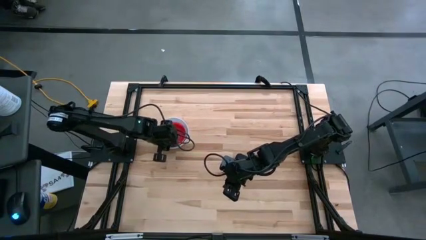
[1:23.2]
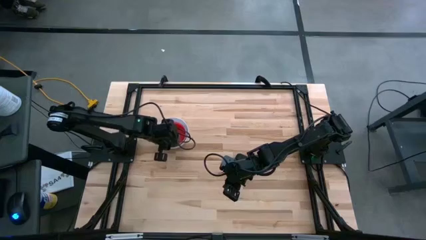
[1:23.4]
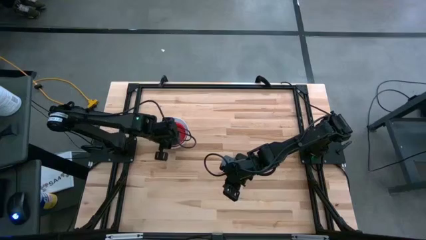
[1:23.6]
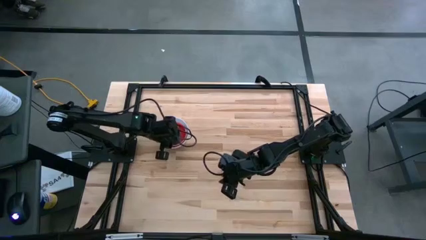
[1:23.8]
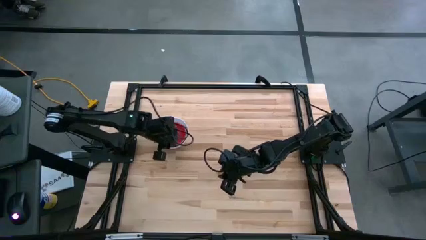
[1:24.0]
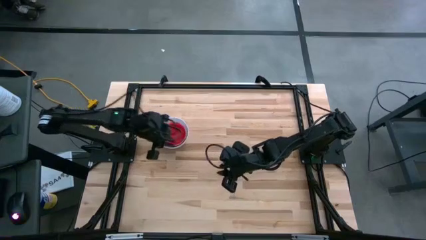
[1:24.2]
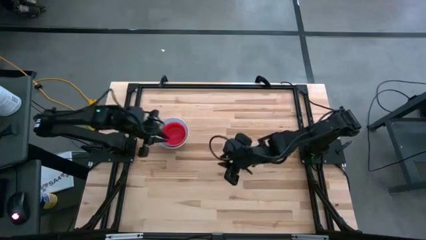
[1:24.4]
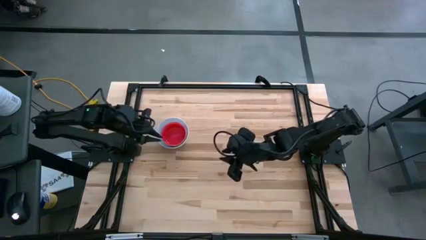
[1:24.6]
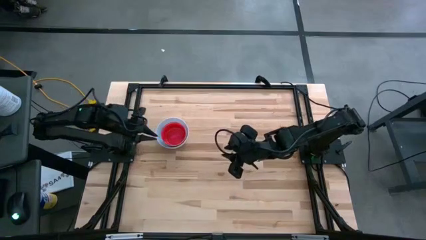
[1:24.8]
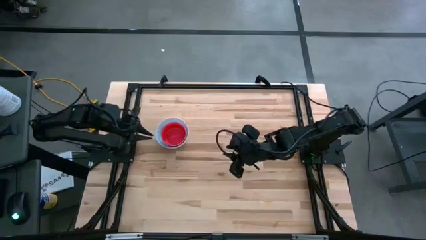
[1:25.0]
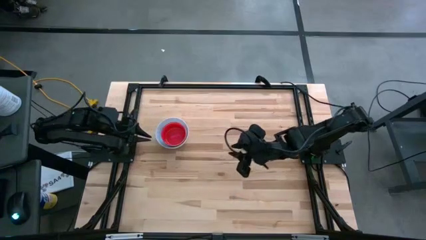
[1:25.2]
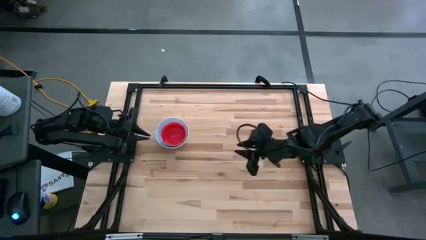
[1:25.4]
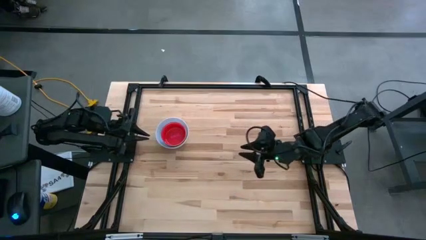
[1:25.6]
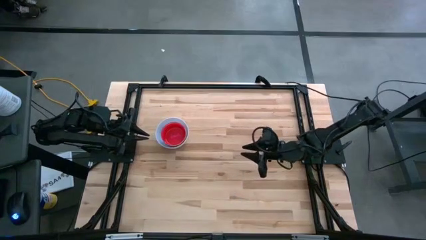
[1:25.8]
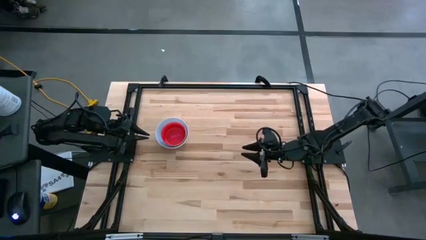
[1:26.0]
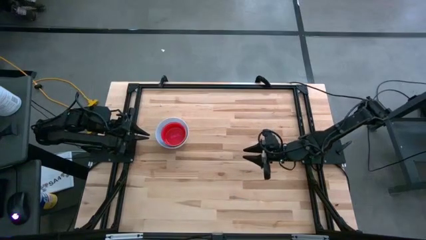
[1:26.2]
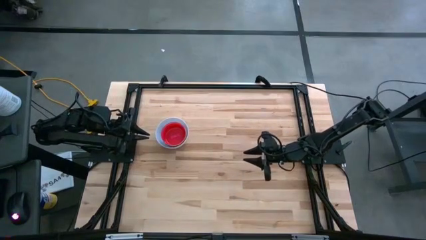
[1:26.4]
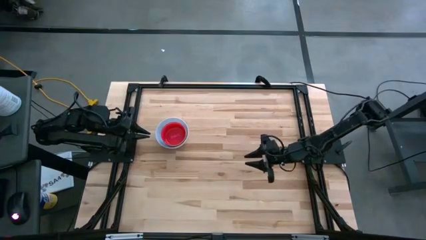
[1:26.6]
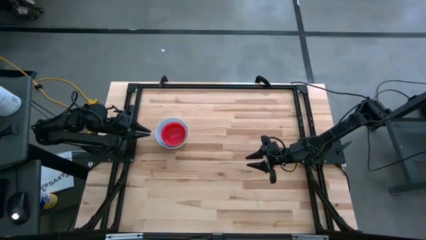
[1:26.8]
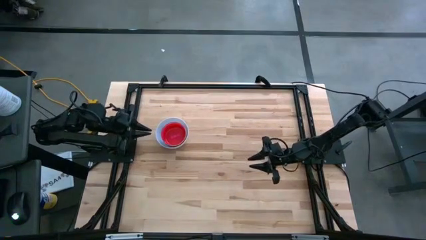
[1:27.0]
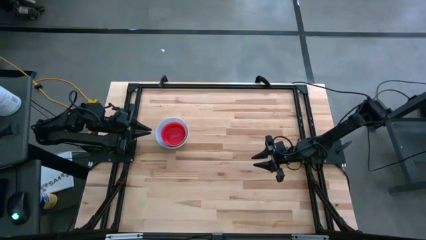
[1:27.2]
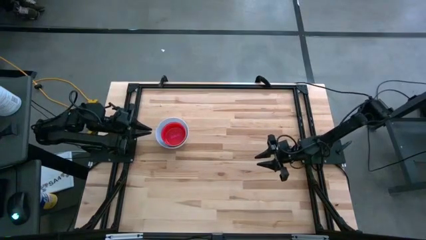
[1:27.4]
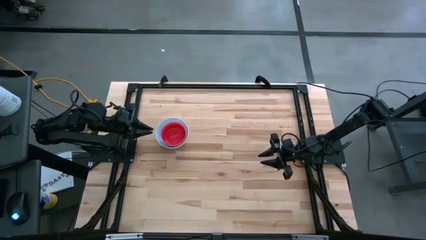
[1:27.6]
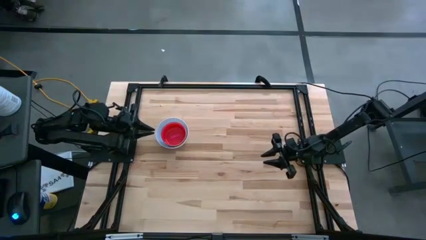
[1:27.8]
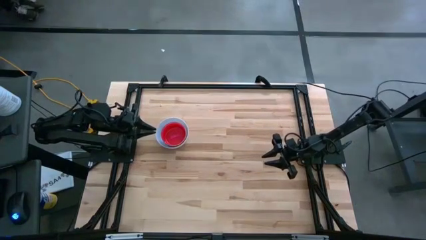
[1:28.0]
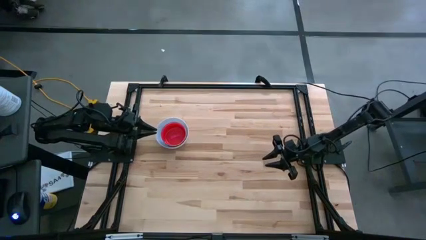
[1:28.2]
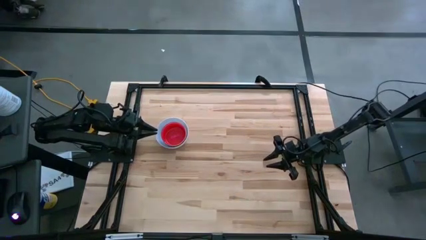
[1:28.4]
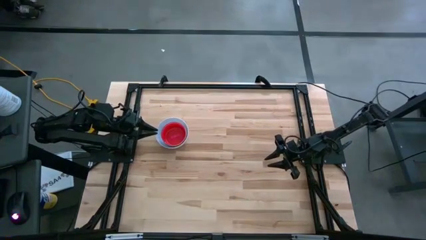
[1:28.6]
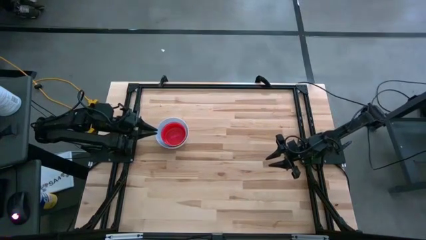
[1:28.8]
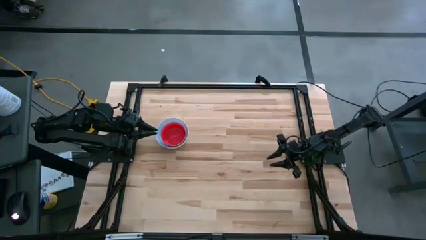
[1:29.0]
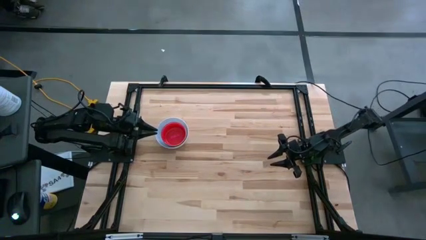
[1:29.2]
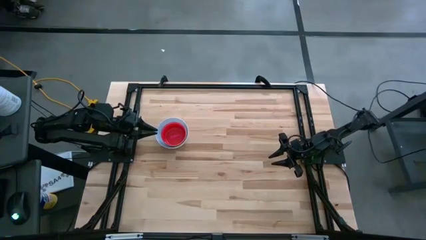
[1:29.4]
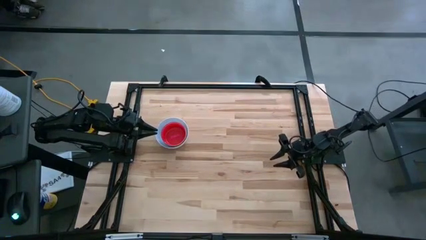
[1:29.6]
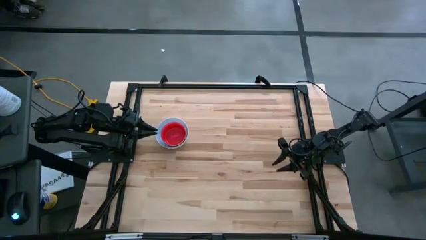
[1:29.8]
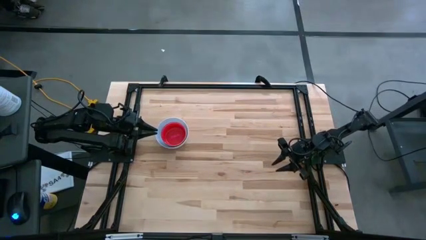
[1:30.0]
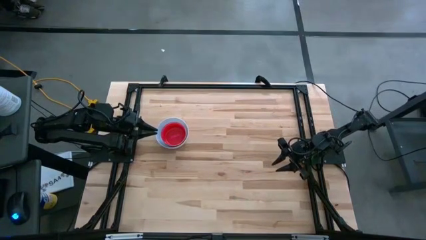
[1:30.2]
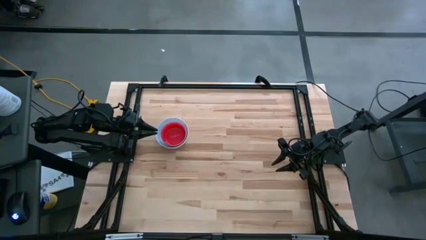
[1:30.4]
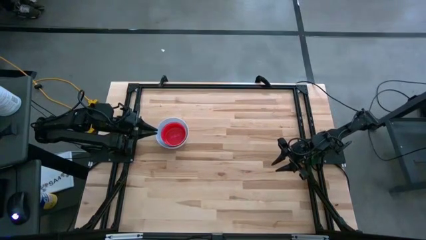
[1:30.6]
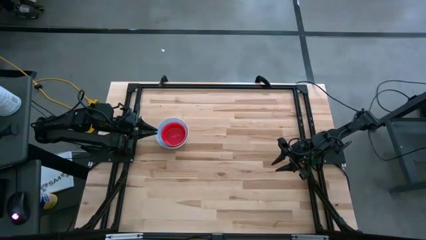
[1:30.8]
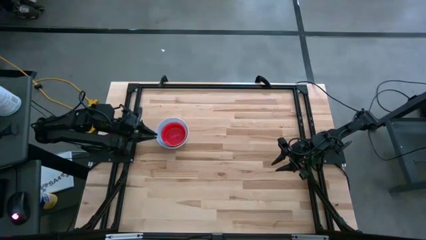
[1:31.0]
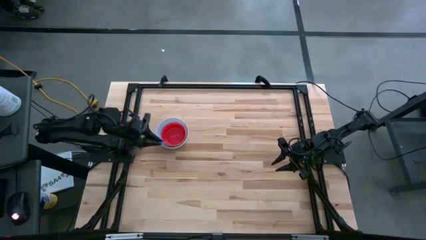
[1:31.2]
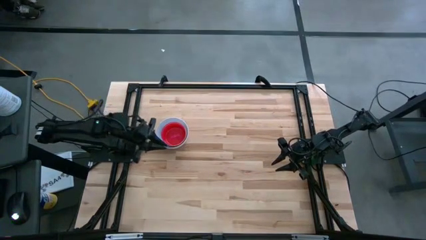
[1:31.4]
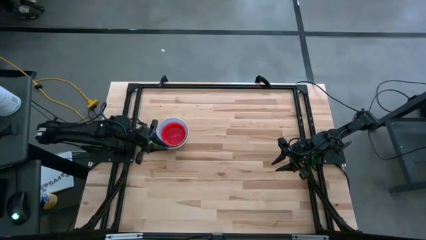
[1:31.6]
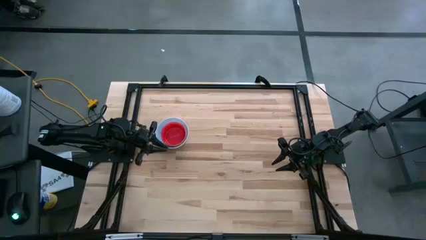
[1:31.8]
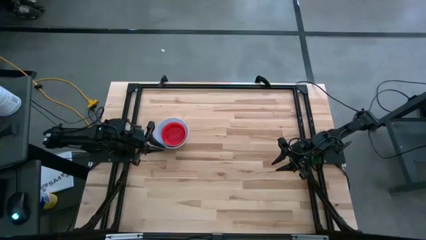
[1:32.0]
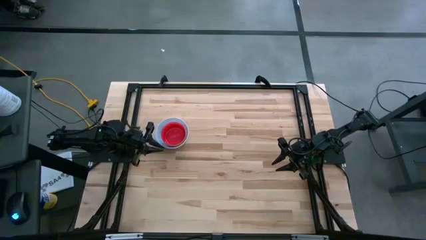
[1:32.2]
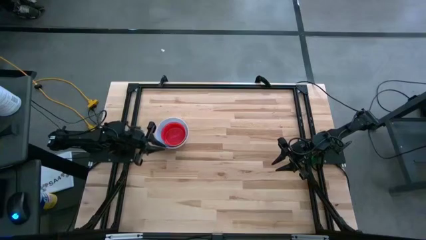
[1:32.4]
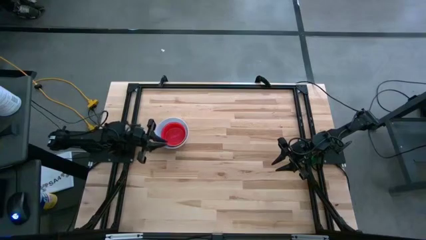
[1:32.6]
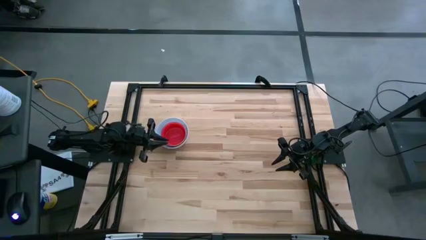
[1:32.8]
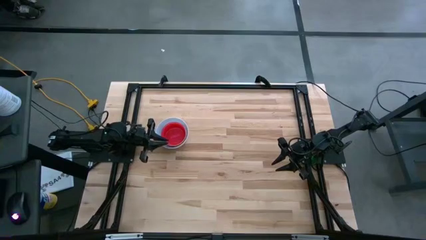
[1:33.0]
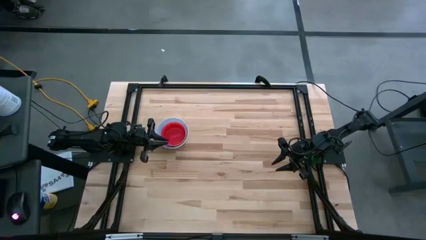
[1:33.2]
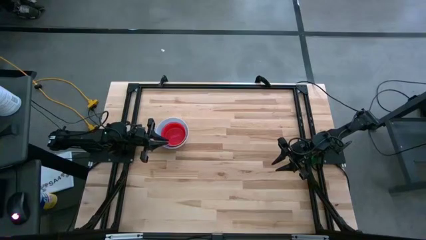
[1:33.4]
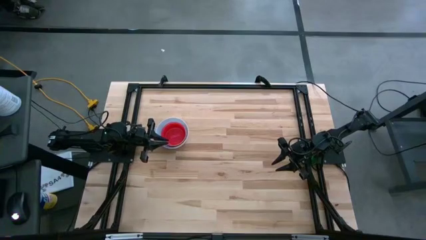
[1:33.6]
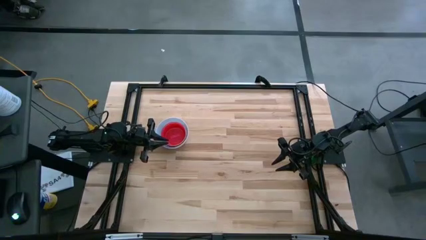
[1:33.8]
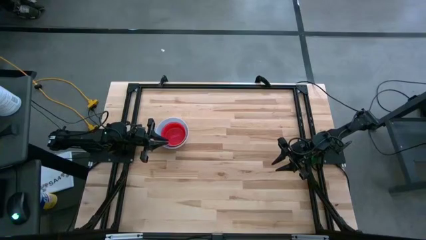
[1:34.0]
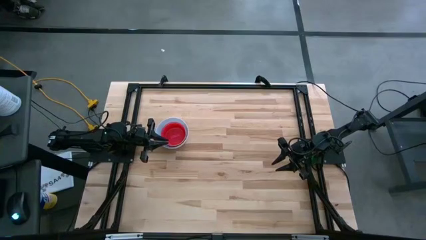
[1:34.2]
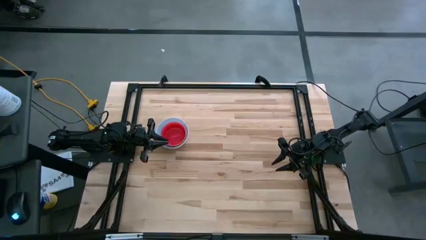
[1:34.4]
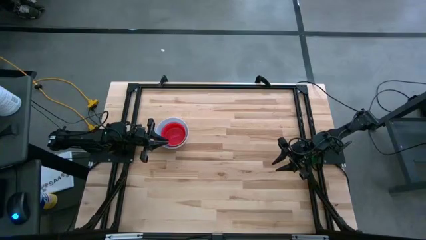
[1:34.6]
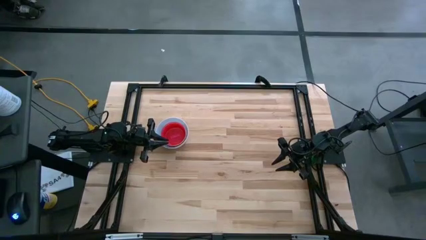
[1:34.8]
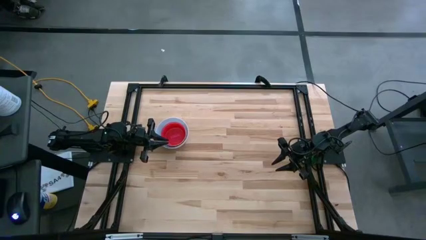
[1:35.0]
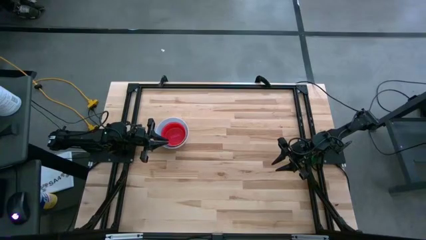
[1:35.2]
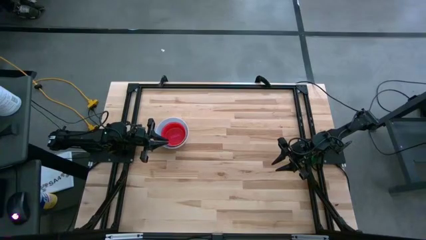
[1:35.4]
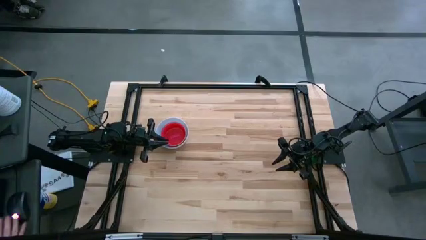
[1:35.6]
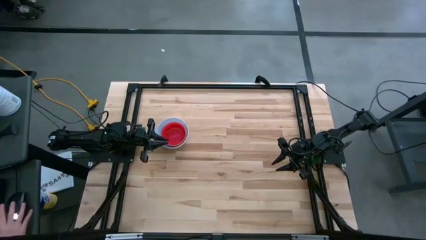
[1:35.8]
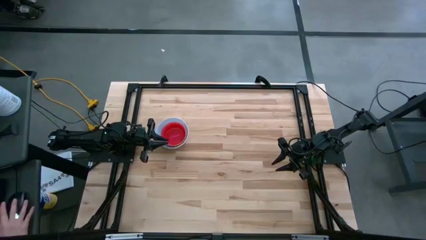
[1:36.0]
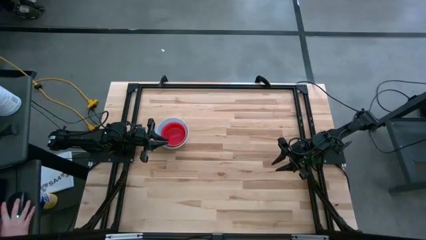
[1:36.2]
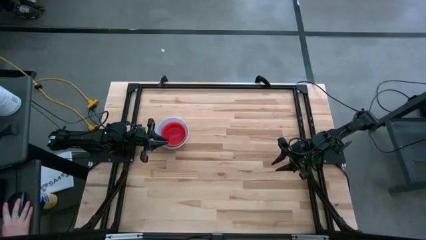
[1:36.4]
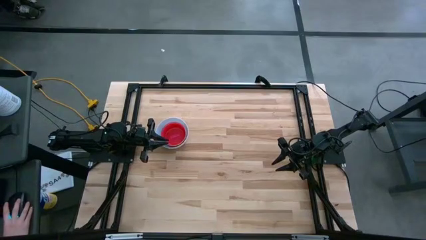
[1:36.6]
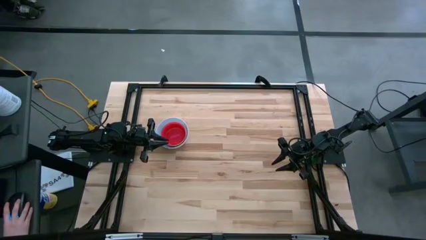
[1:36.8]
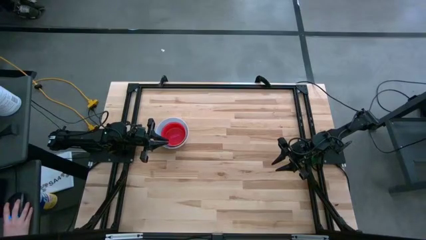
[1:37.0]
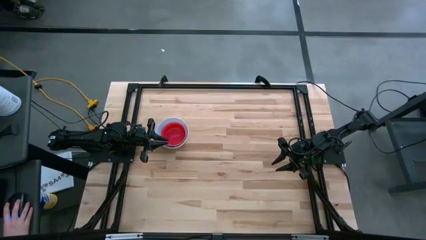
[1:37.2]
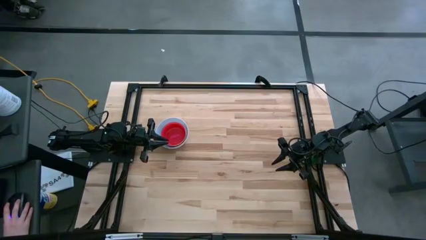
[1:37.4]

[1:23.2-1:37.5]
Return to Home Position
